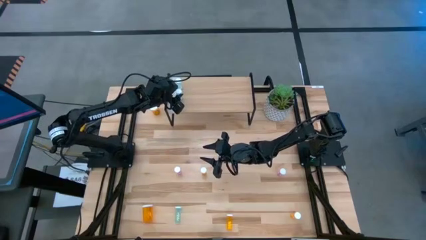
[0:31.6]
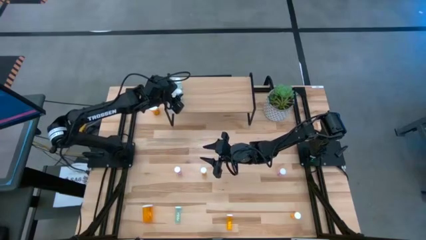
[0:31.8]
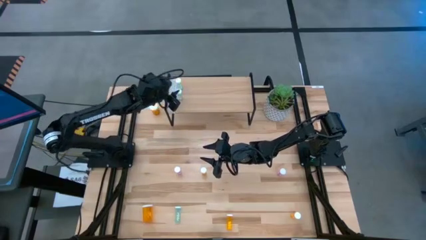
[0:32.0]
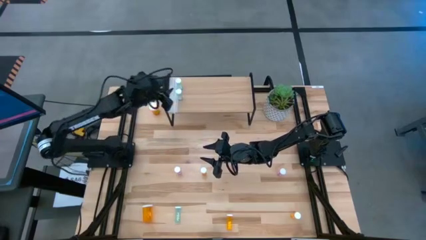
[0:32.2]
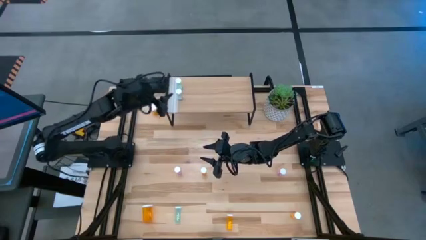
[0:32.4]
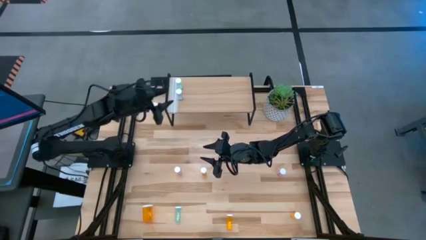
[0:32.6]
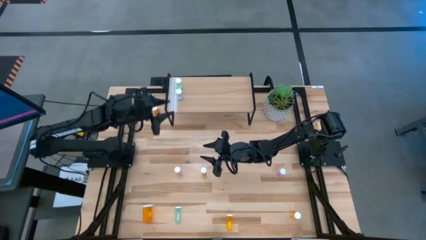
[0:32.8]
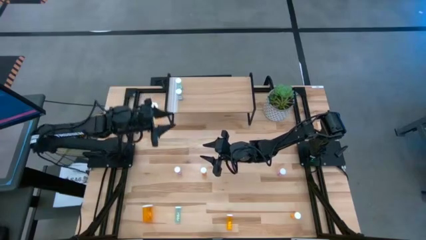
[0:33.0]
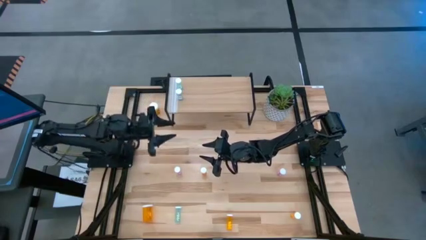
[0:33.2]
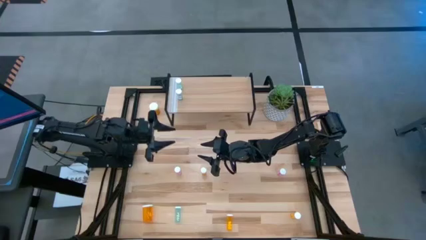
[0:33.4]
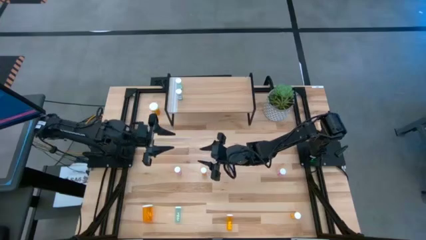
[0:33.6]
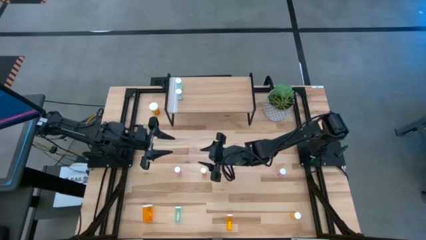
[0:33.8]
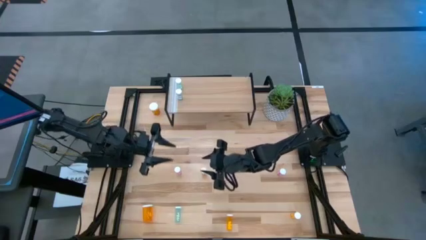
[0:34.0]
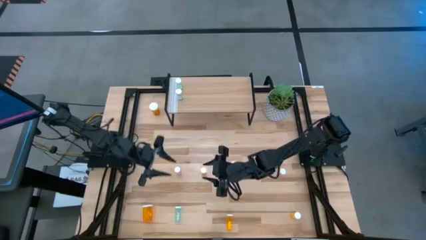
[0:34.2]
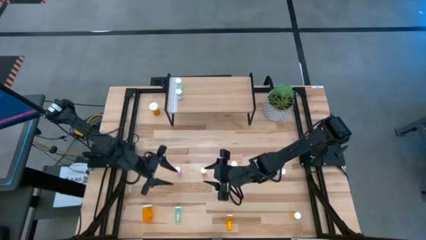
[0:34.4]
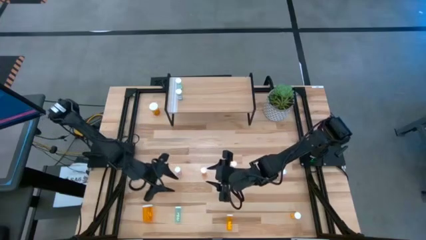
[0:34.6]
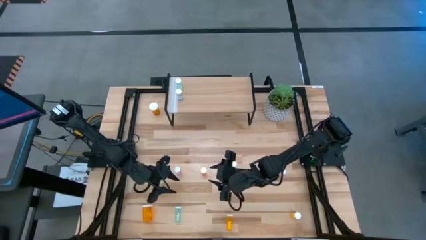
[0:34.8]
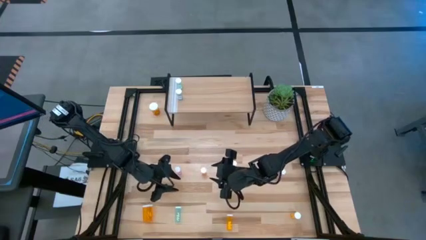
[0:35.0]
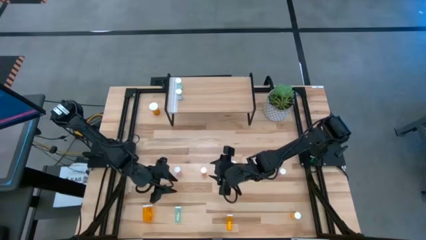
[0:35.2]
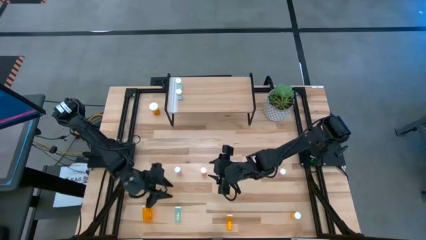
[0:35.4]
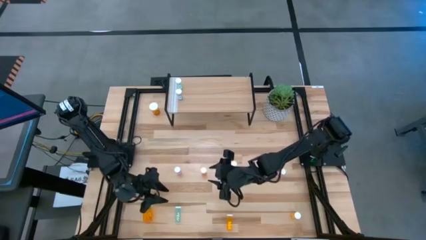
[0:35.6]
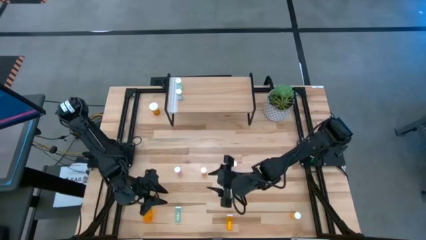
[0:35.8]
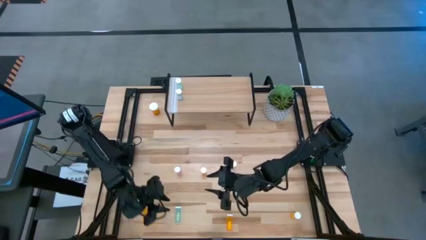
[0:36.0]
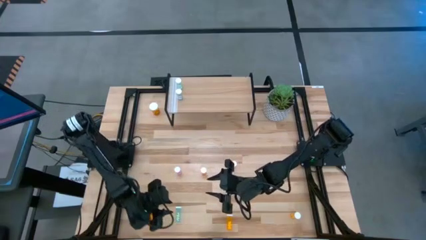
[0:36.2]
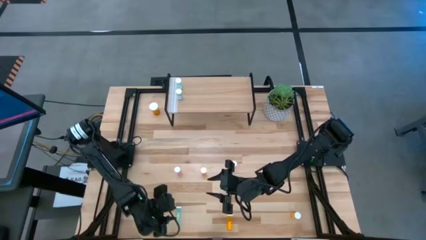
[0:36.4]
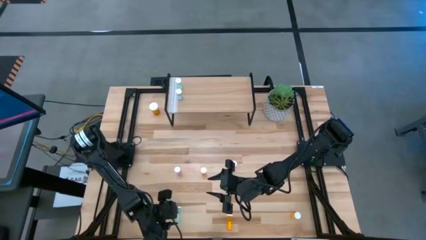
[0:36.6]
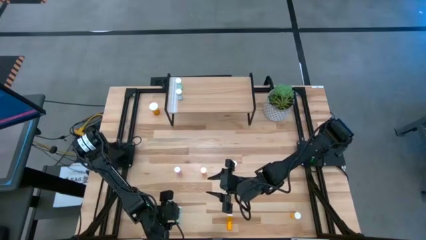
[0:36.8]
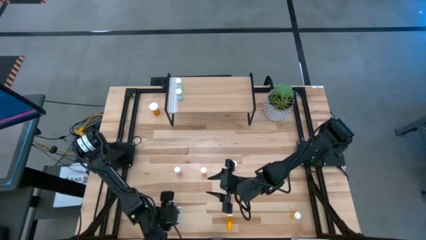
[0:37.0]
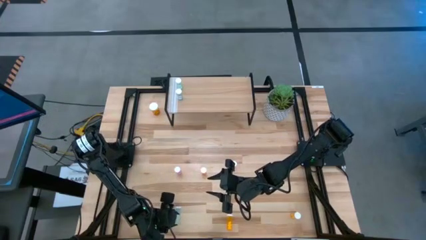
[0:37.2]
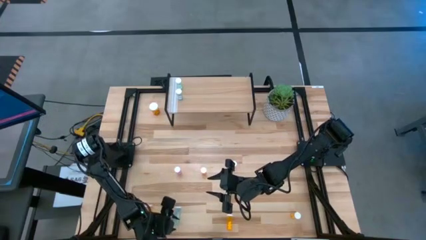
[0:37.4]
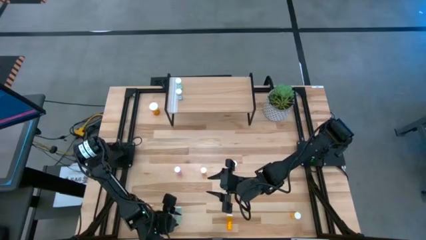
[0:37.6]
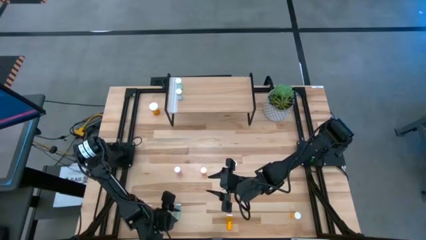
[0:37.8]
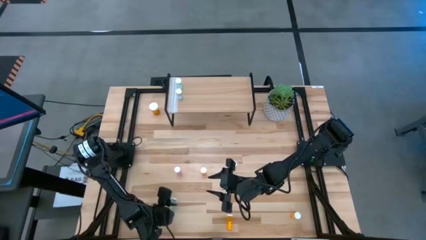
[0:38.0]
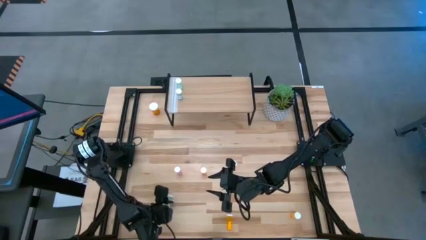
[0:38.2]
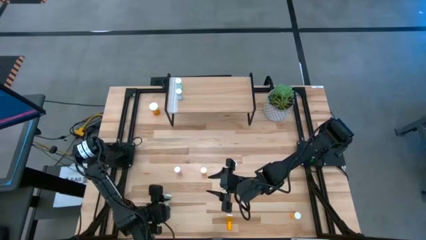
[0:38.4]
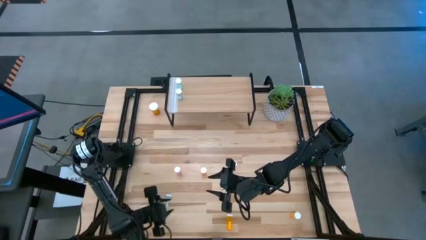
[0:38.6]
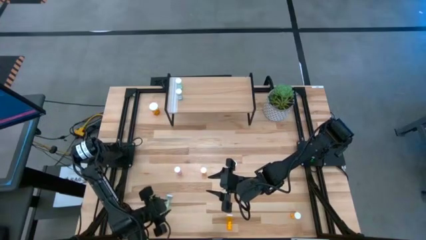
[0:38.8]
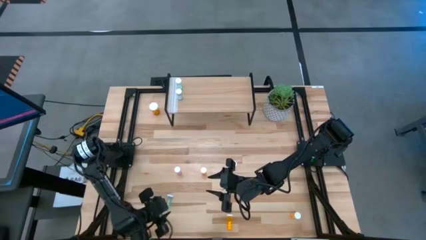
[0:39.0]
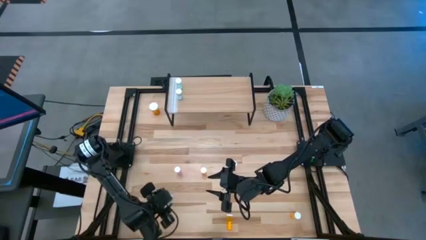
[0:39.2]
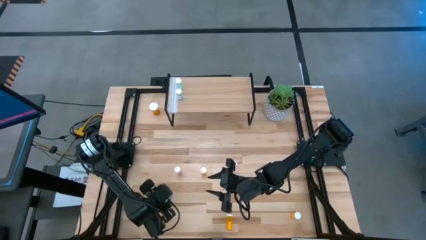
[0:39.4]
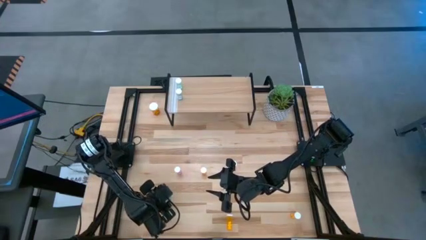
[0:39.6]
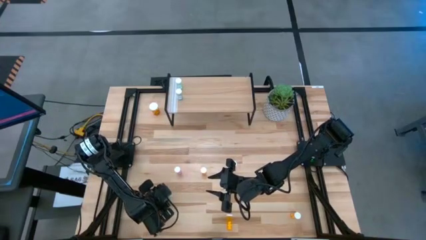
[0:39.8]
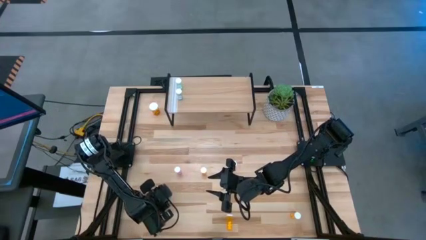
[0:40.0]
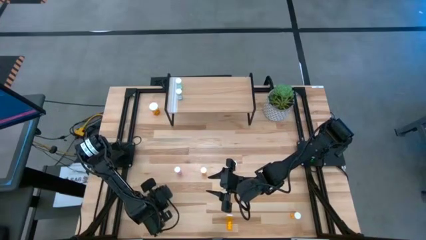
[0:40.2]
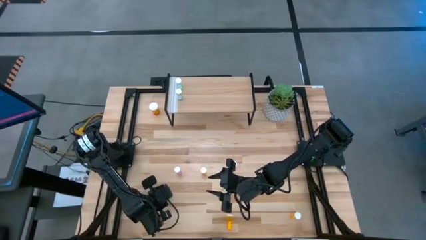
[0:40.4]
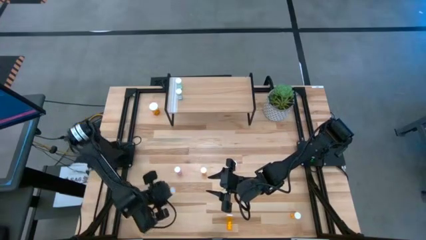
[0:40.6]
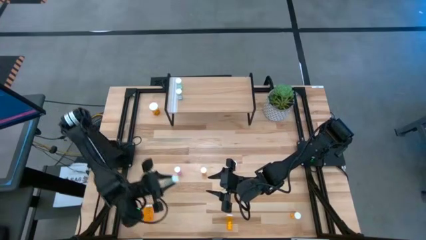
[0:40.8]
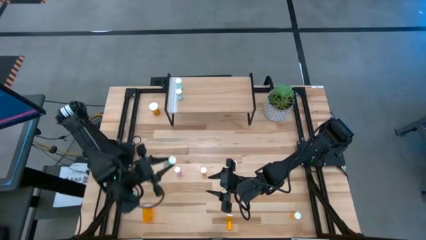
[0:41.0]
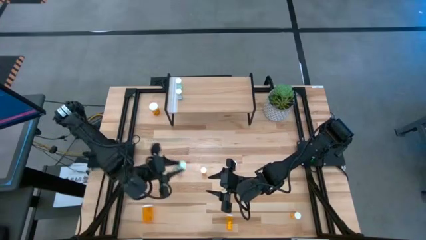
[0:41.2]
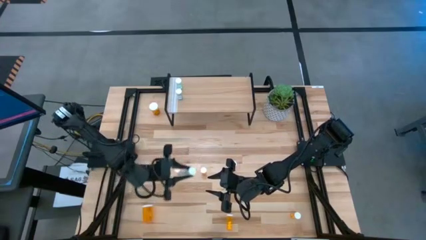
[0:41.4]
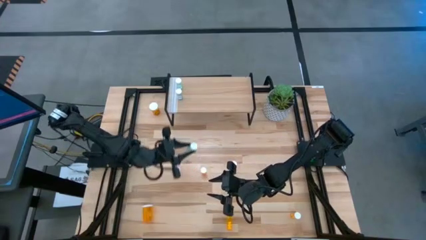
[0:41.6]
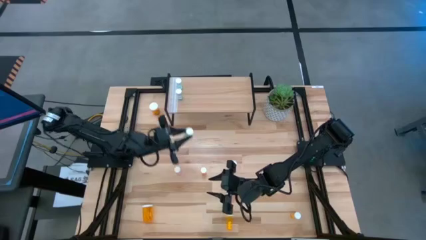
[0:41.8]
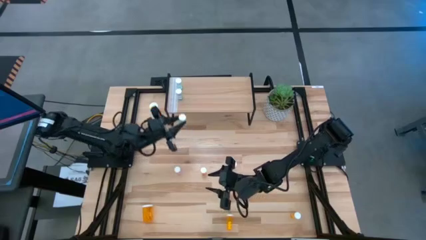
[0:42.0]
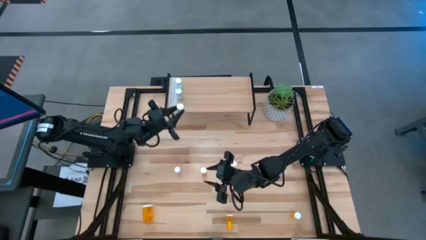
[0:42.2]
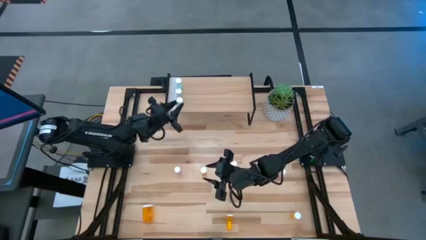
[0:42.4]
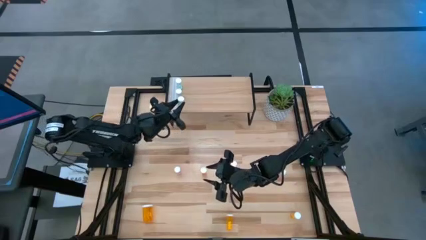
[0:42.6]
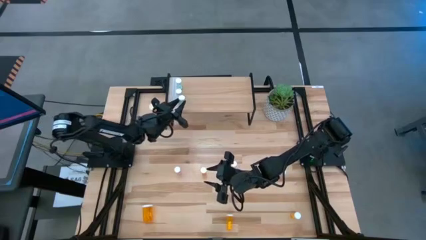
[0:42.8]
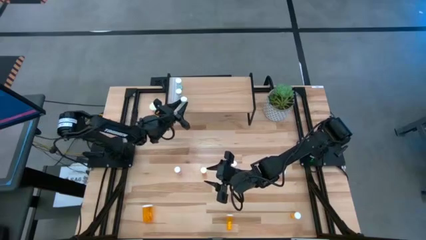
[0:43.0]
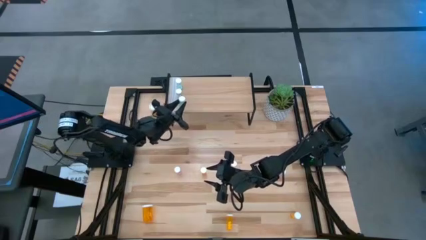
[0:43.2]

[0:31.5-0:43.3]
Task: Pick and place medicine bottles onto shelf by color
Put the blue pill bottle on the shelf aligned with the other blue pill bottles
